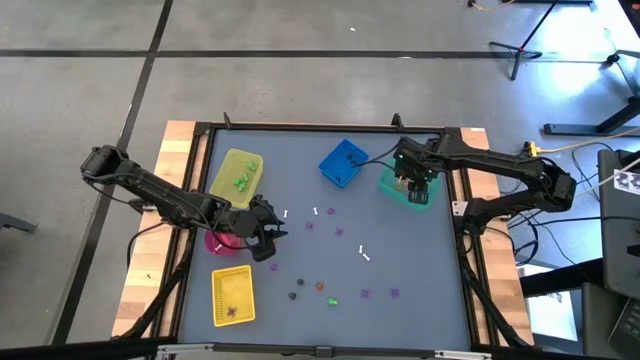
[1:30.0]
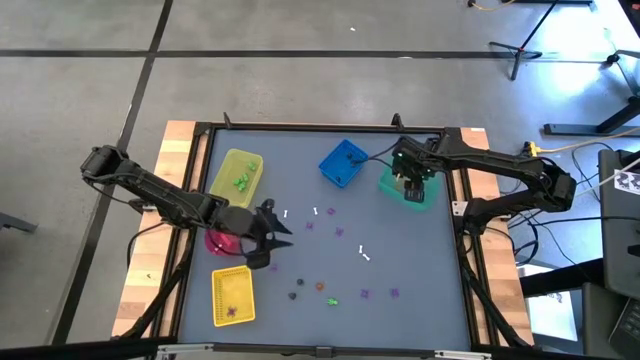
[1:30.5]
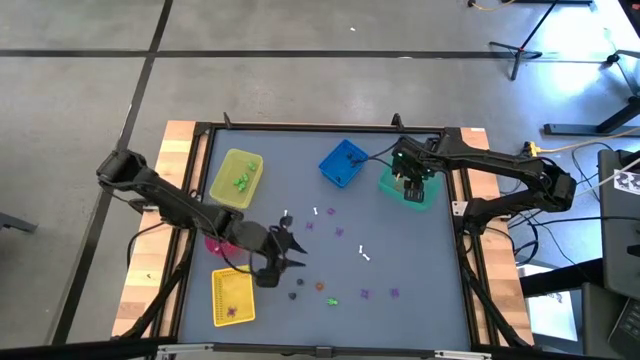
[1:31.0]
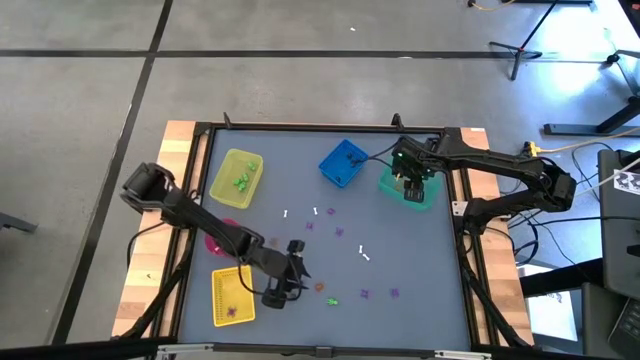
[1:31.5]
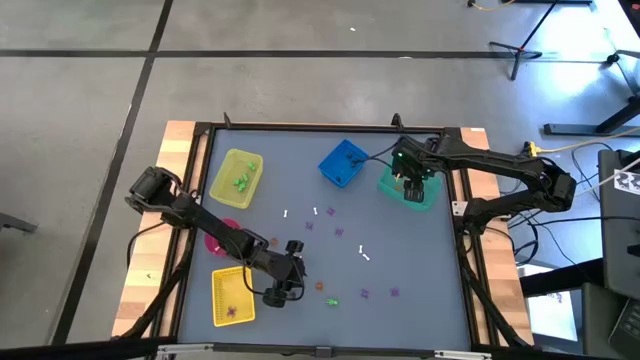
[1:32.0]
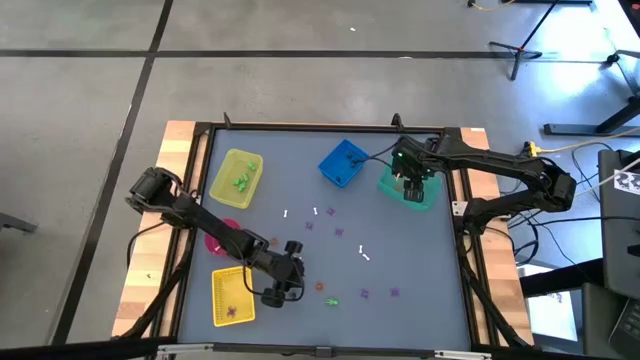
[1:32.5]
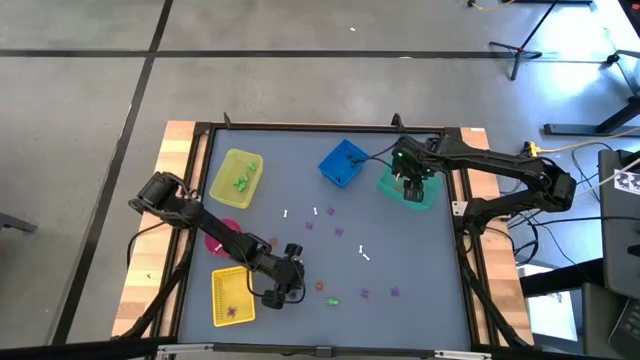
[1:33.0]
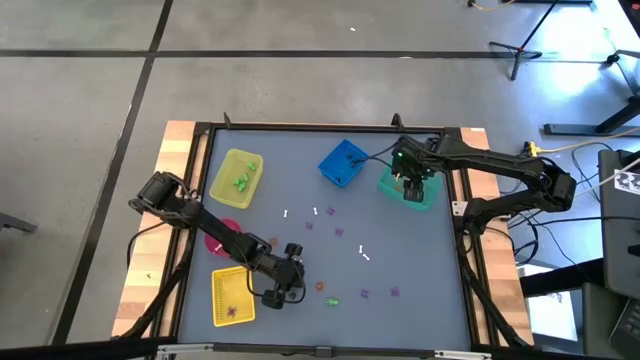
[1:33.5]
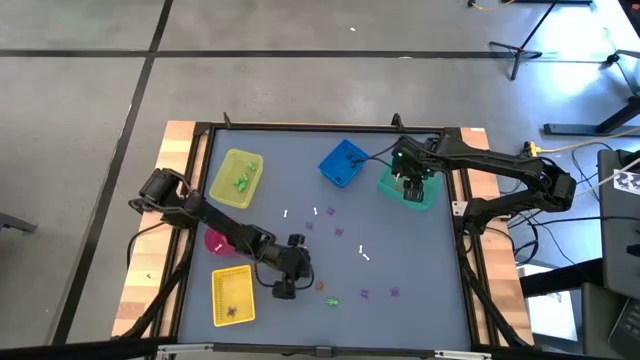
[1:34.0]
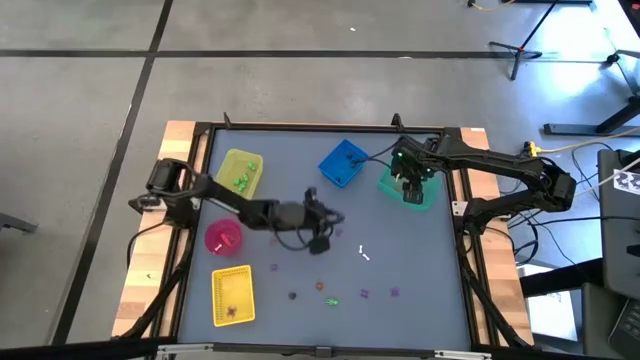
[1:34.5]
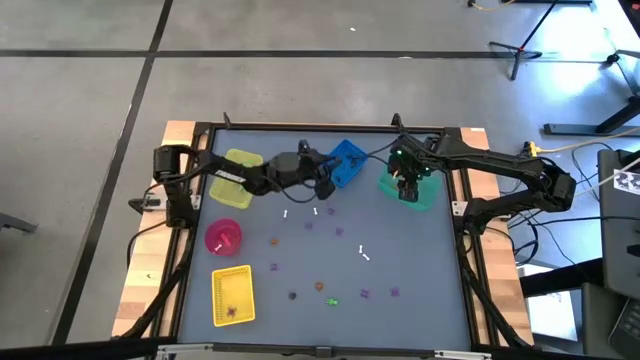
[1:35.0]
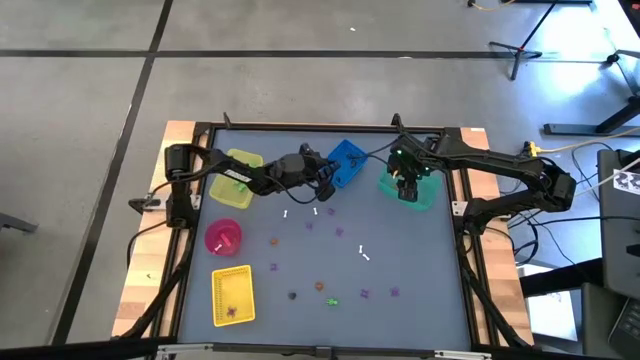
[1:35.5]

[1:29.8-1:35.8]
Task: Sort Halloween decoration
Put the black skull toy into the blue basket

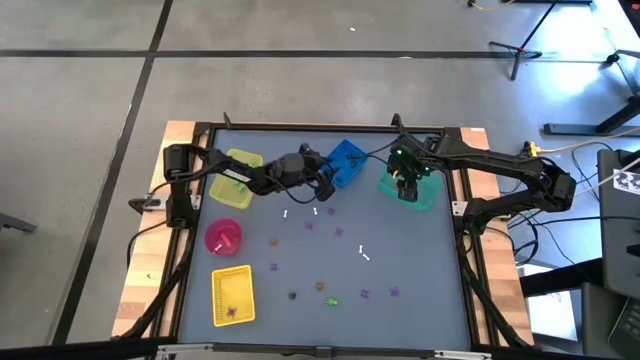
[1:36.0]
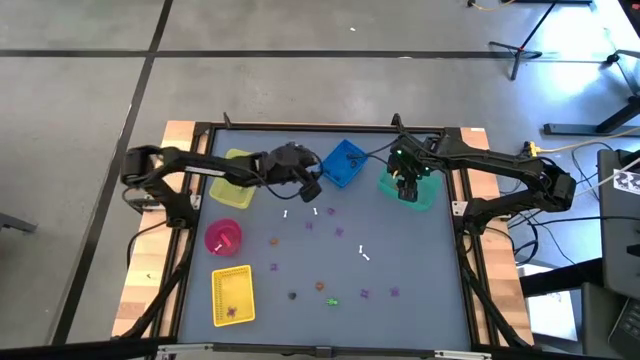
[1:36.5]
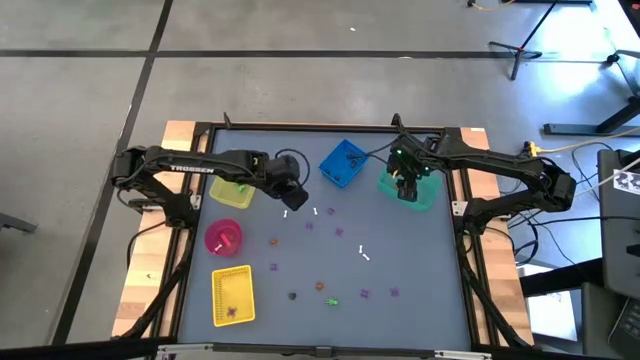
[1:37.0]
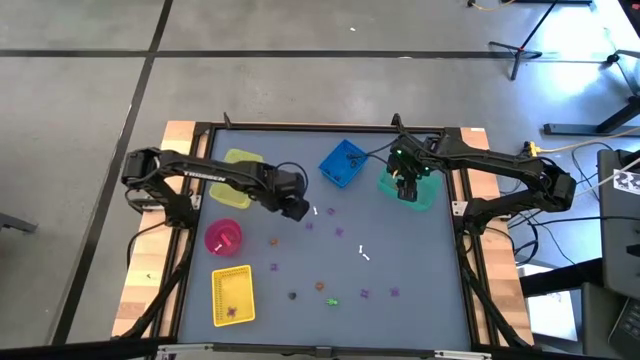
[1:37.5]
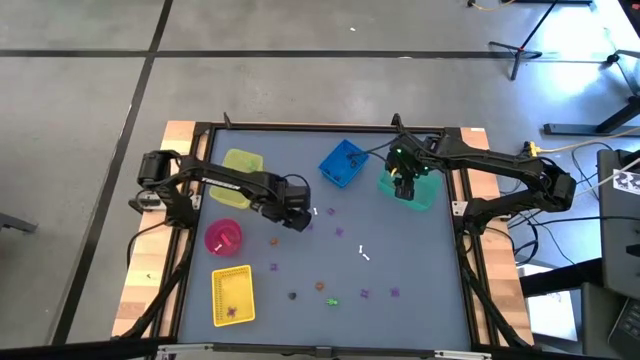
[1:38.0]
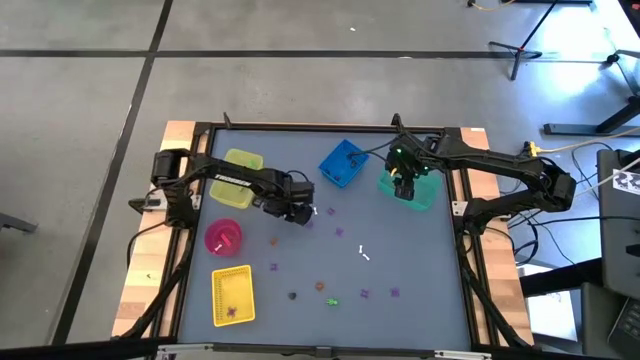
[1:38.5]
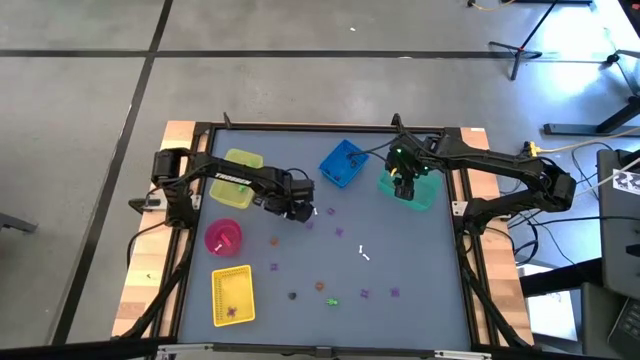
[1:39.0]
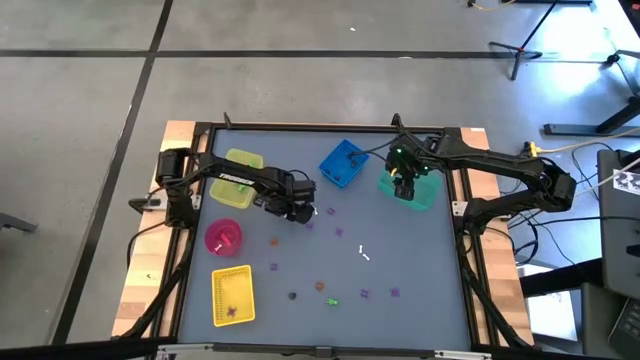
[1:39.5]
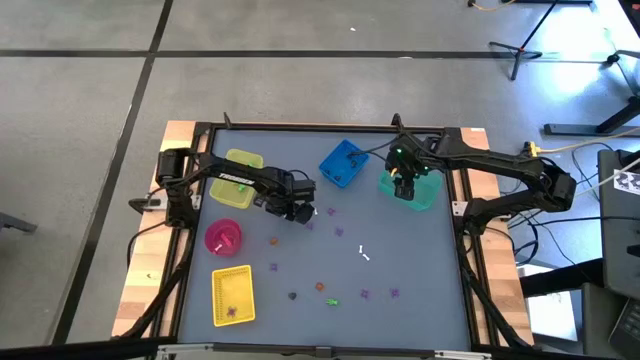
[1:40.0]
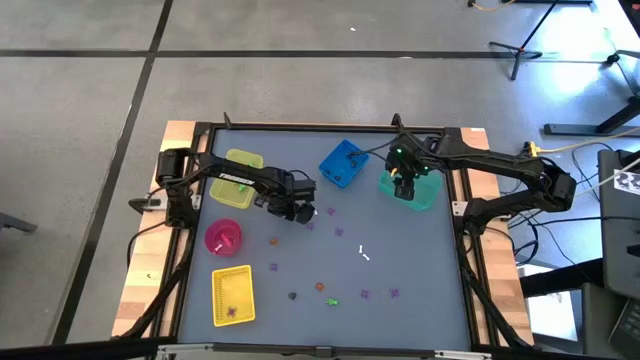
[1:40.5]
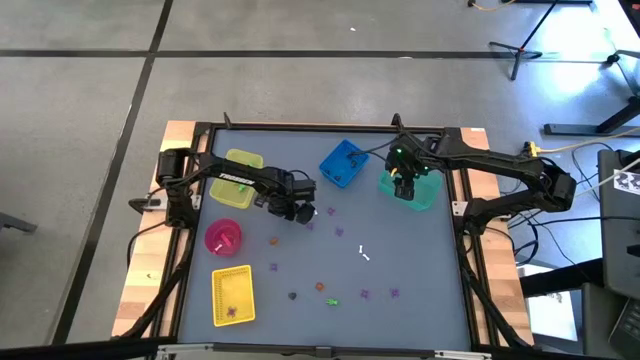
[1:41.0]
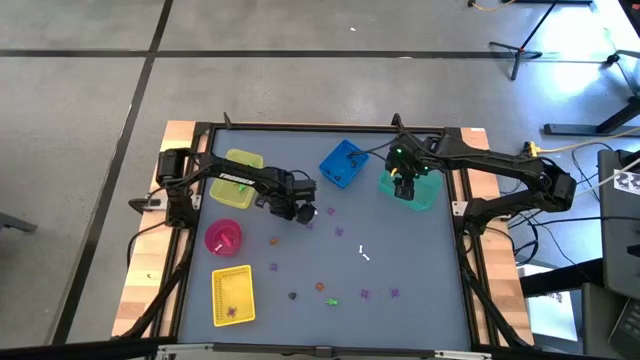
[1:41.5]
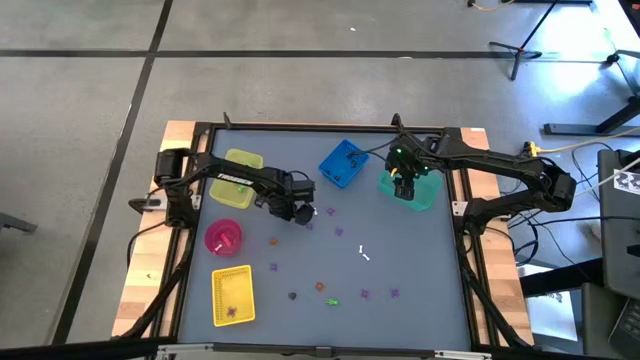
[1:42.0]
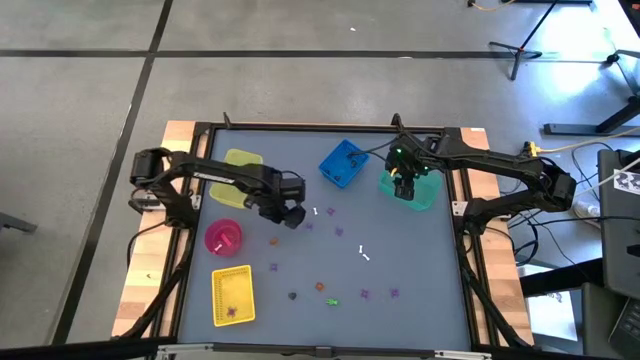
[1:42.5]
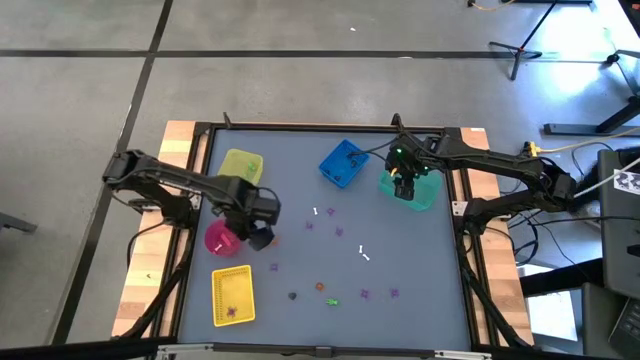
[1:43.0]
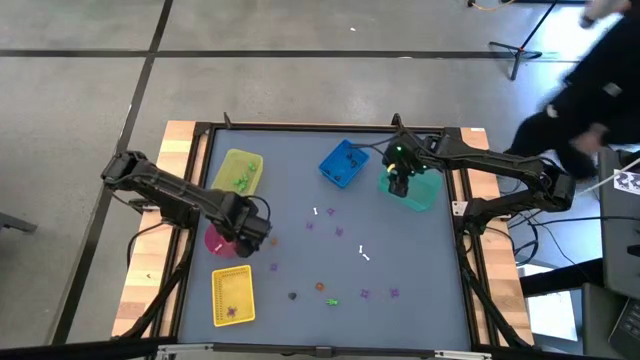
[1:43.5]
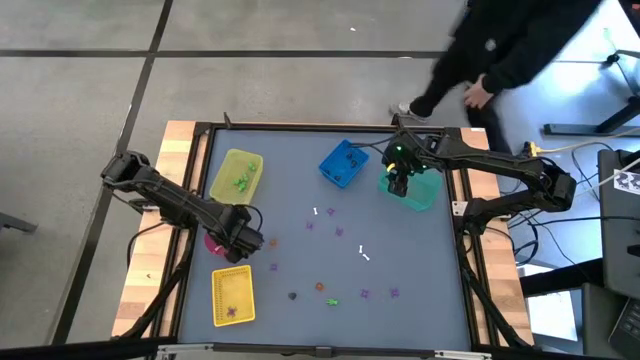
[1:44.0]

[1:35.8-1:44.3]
Put the white bone toy into the red bowl

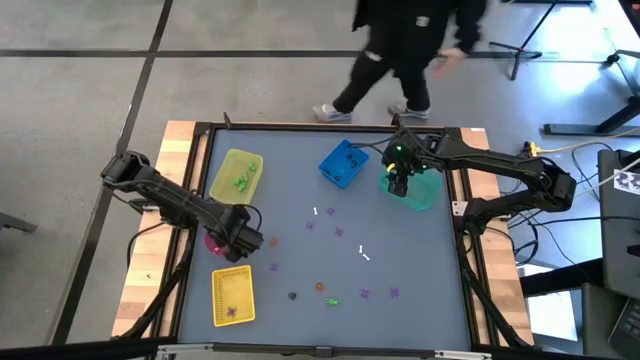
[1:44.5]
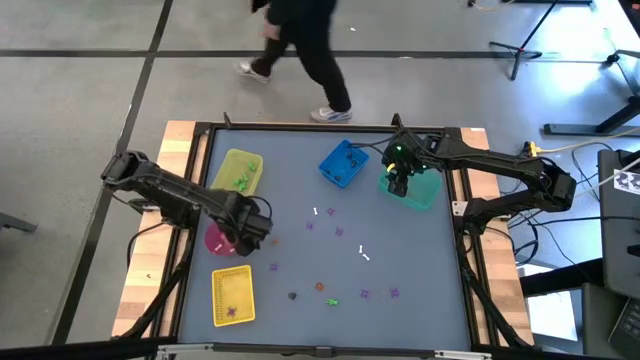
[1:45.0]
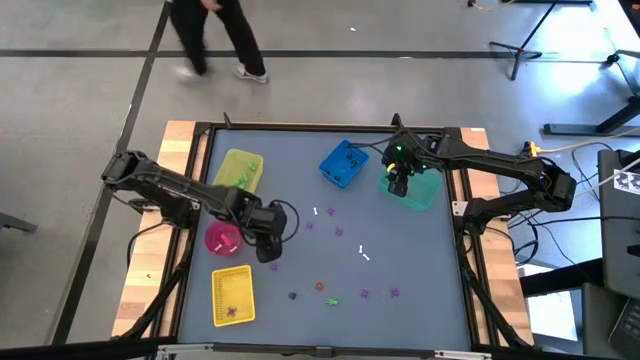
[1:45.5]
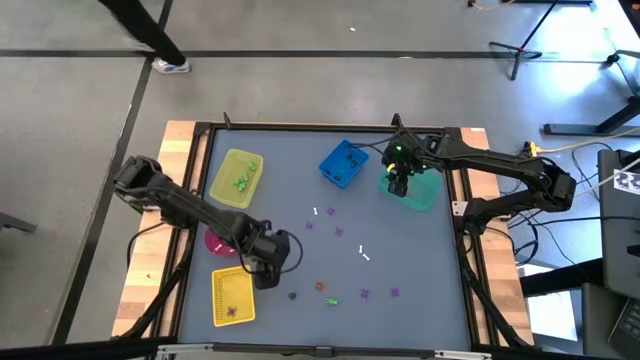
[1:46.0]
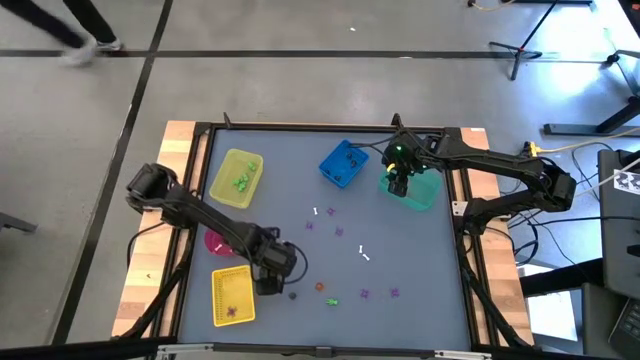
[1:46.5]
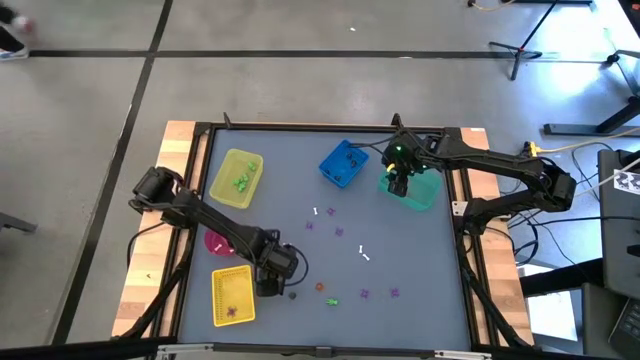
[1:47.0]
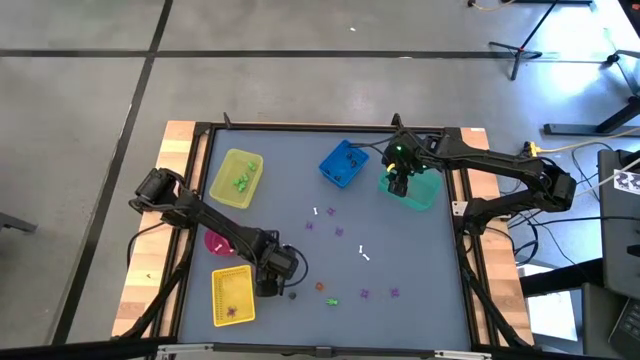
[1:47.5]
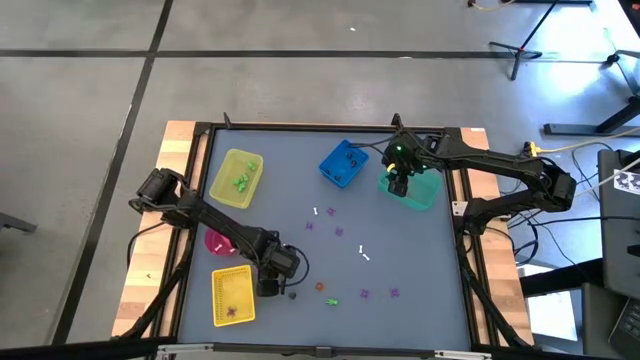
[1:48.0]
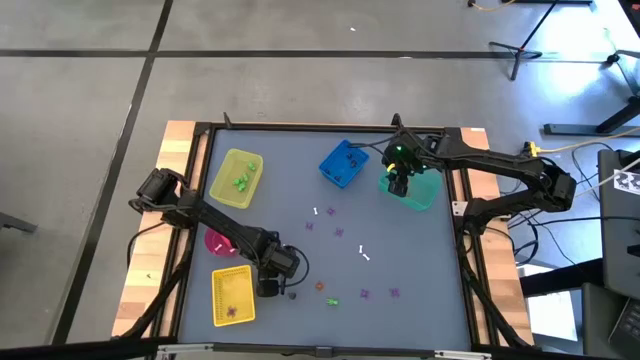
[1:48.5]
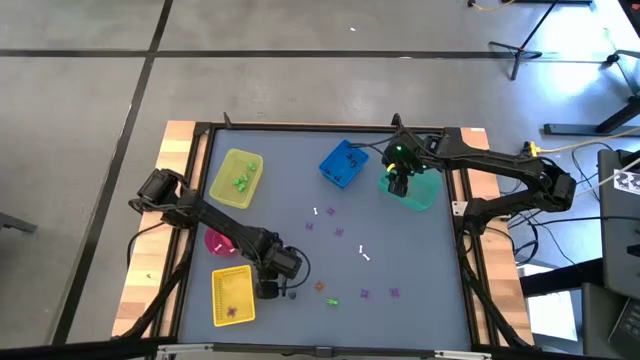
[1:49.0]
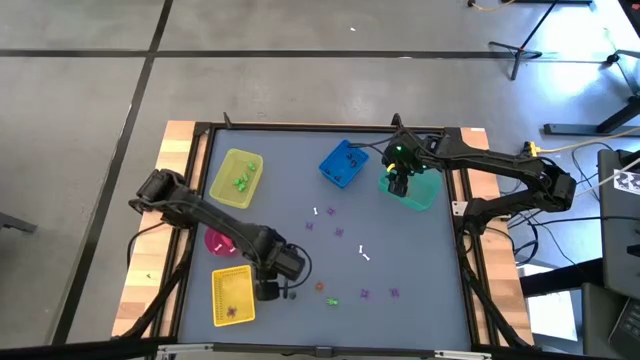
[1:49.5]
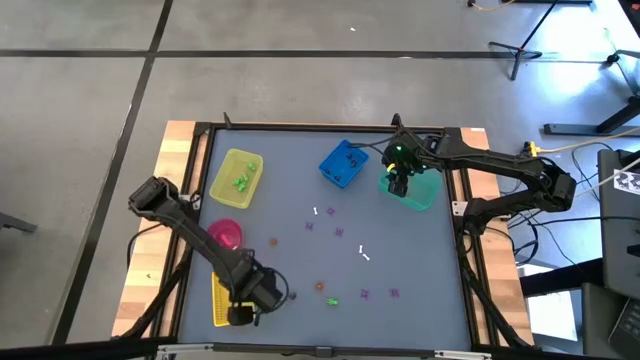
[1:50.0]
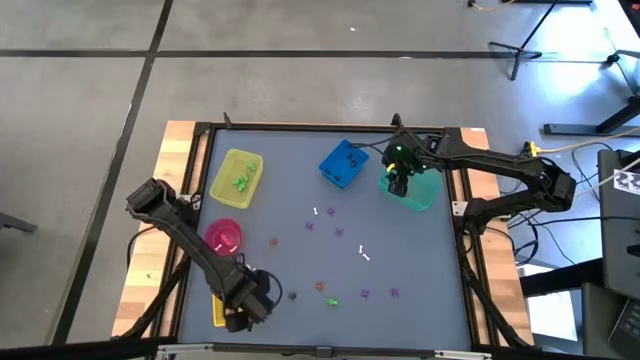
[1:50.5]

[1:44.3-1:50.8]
Put the purple spider toy into the yellow basket

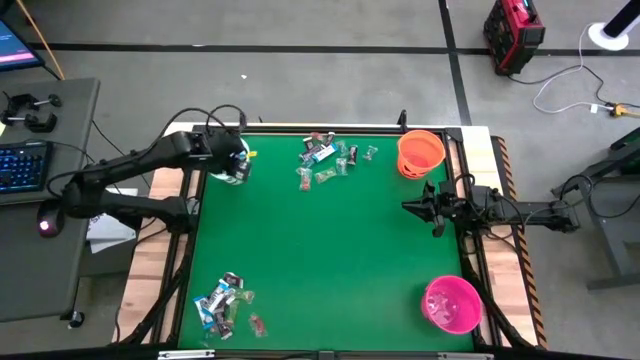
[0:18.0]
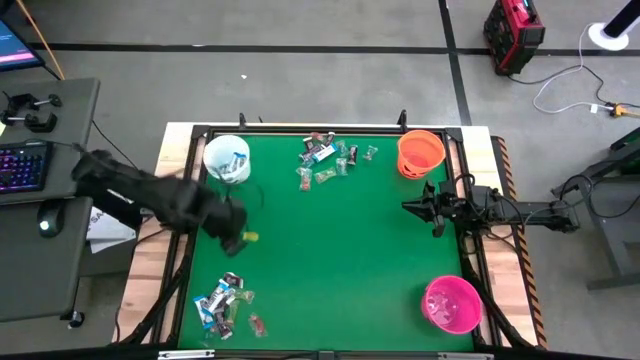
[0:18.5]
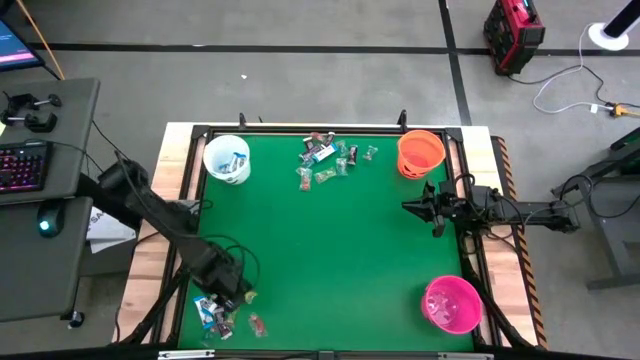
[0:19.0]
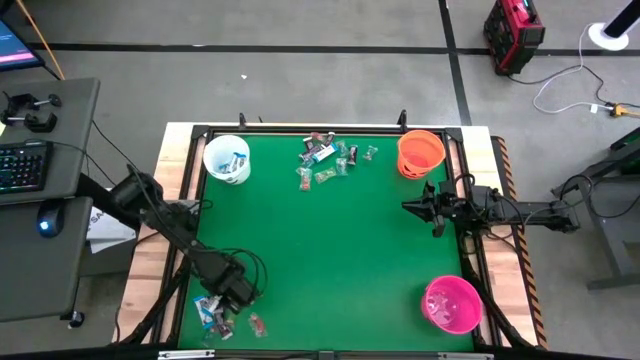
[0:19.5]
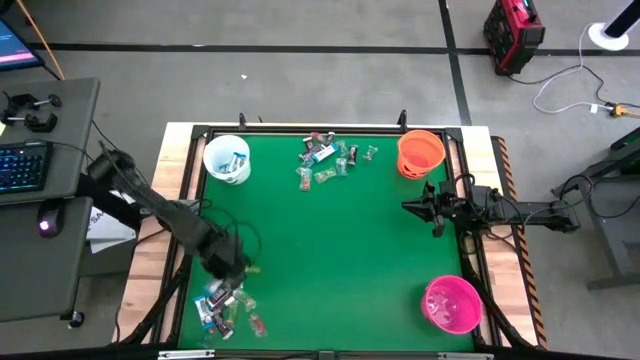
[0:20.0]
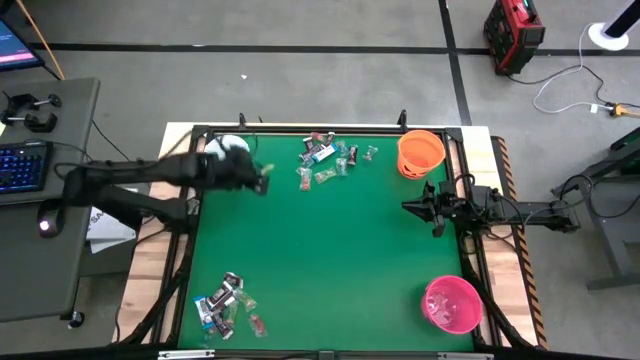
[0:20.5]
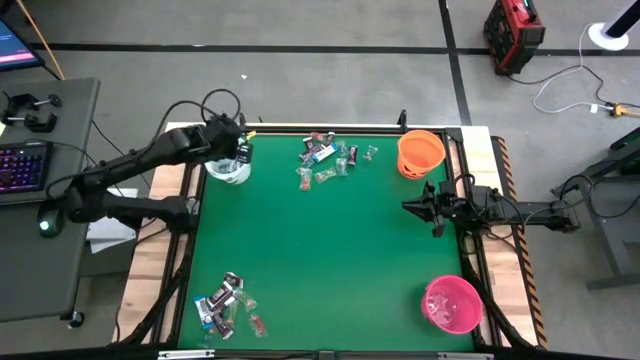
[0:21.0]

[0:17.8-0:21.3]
Task: Sort candy by brand, put in halloween buckets
Put the white chocolate bar into the white bucket
